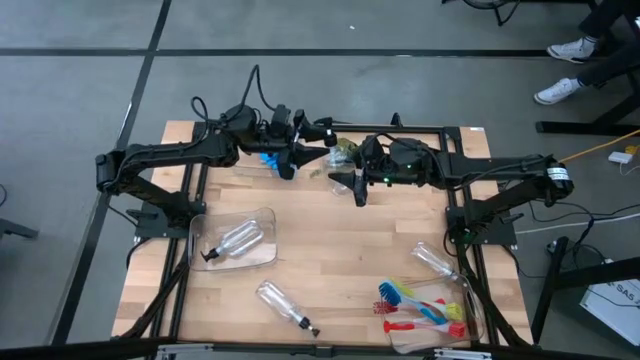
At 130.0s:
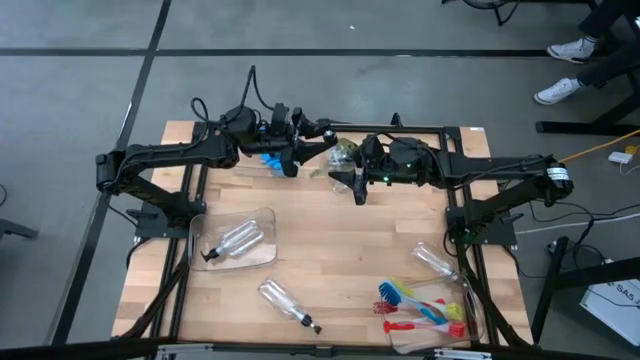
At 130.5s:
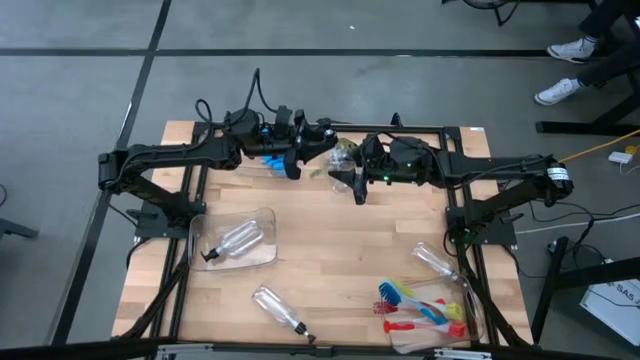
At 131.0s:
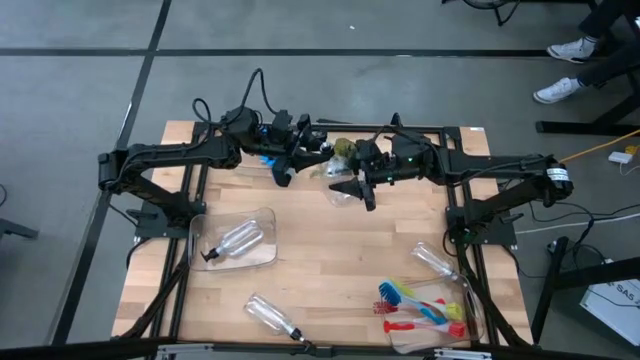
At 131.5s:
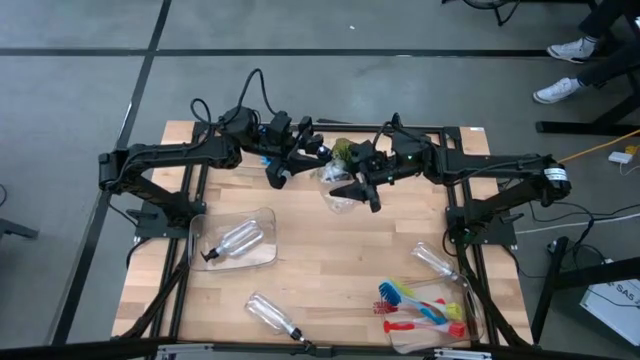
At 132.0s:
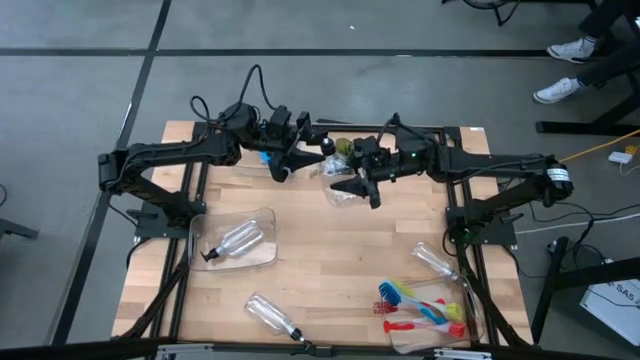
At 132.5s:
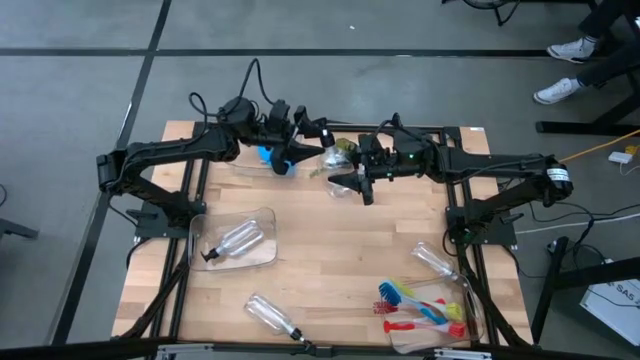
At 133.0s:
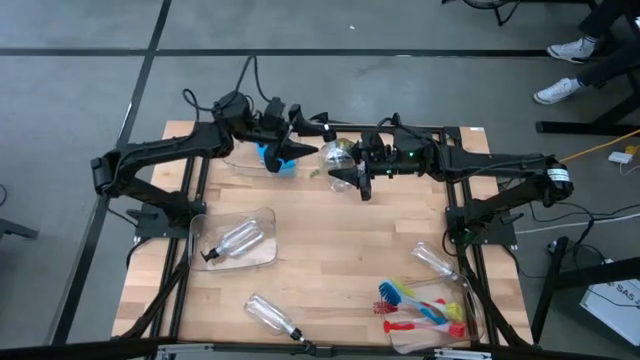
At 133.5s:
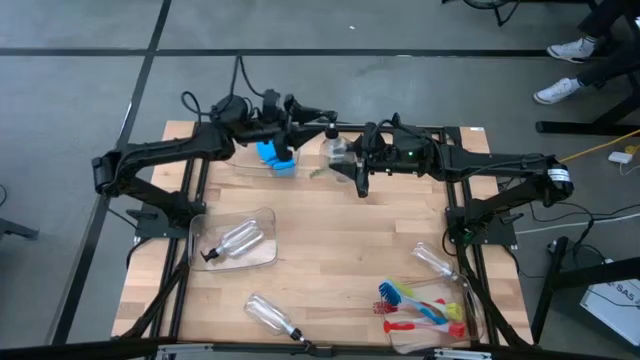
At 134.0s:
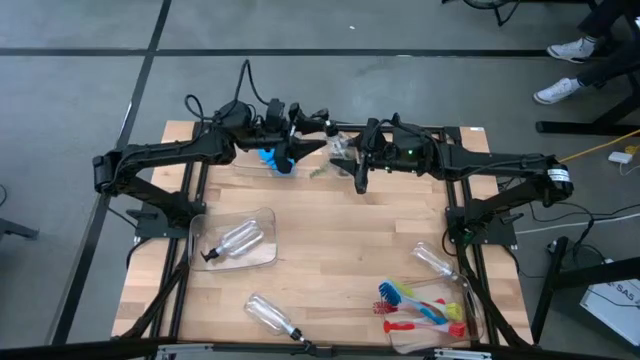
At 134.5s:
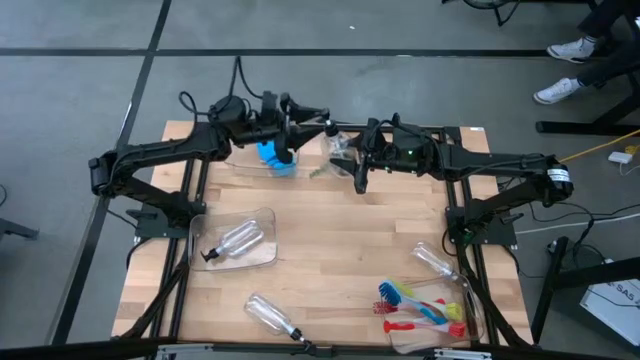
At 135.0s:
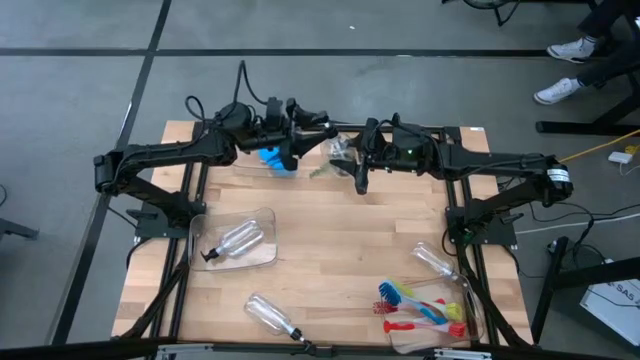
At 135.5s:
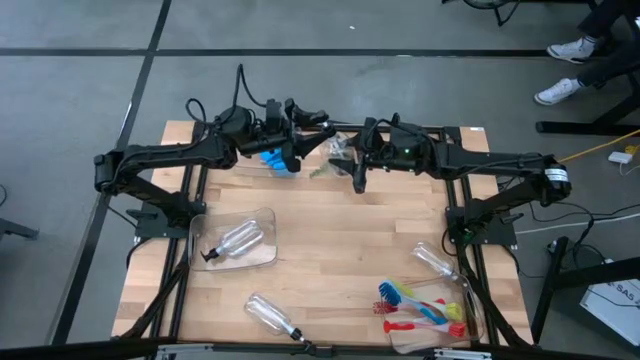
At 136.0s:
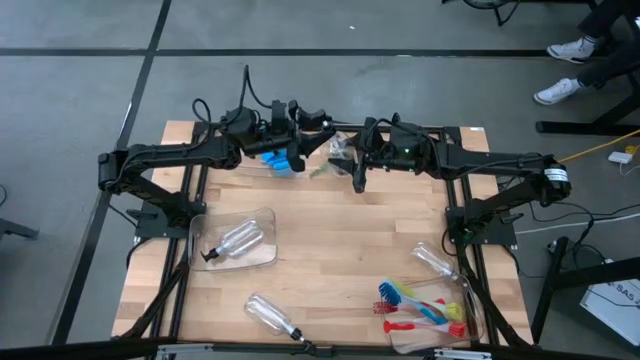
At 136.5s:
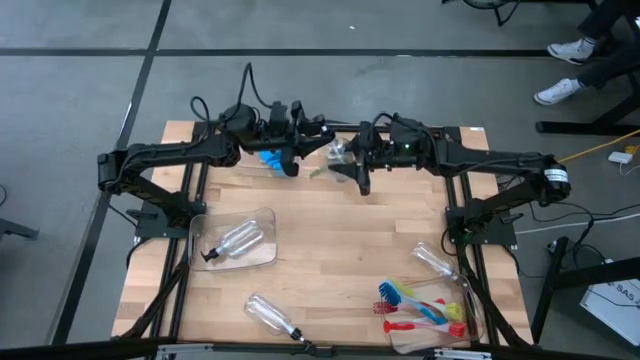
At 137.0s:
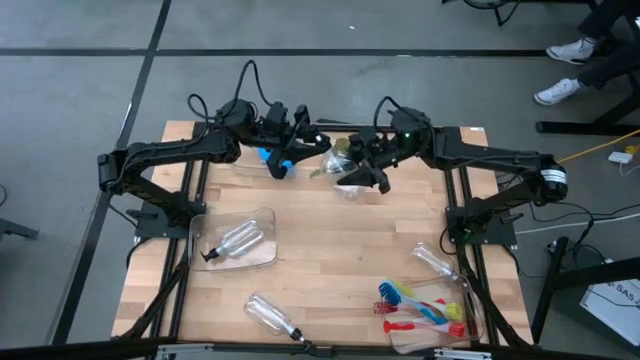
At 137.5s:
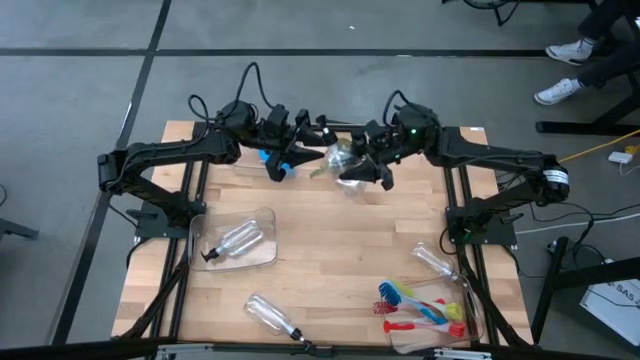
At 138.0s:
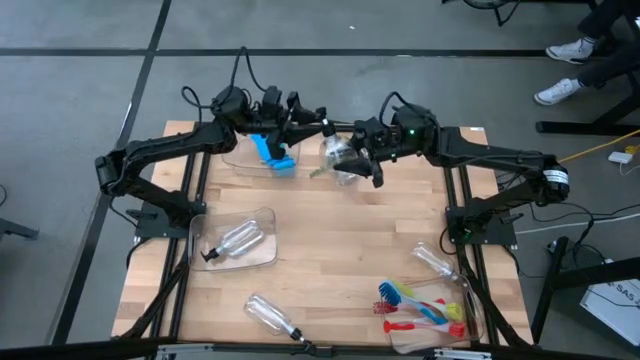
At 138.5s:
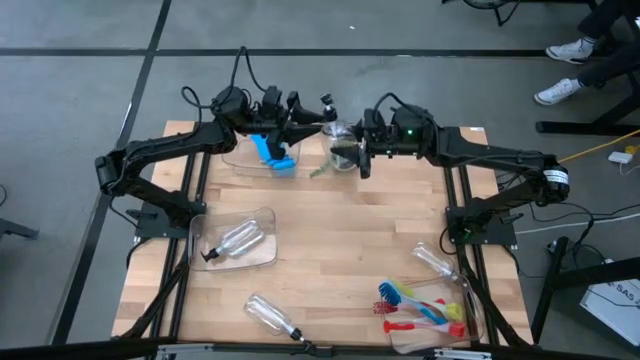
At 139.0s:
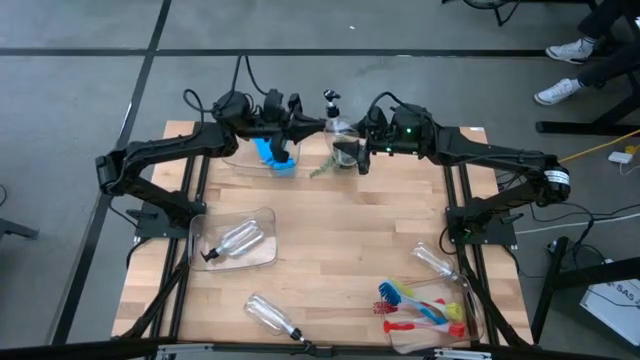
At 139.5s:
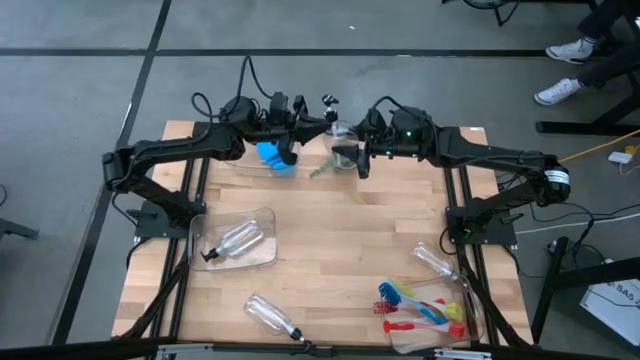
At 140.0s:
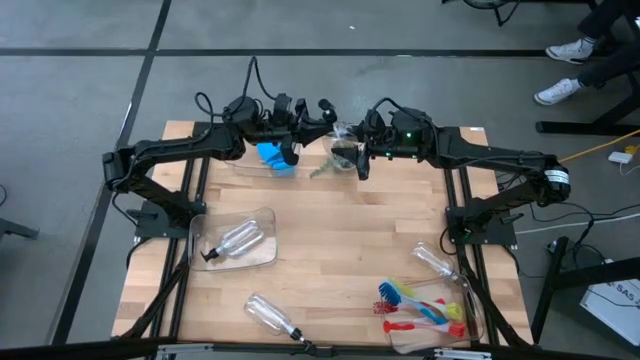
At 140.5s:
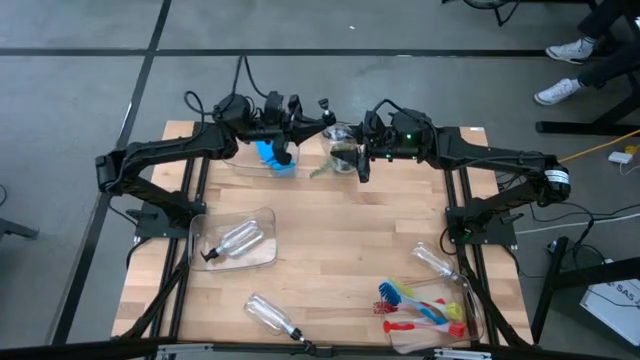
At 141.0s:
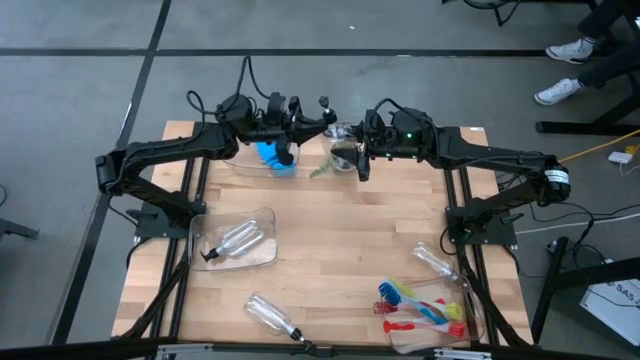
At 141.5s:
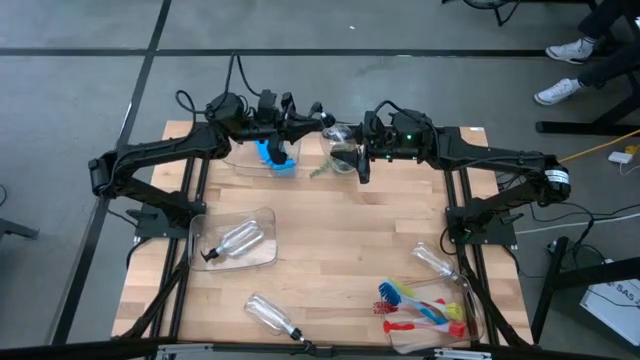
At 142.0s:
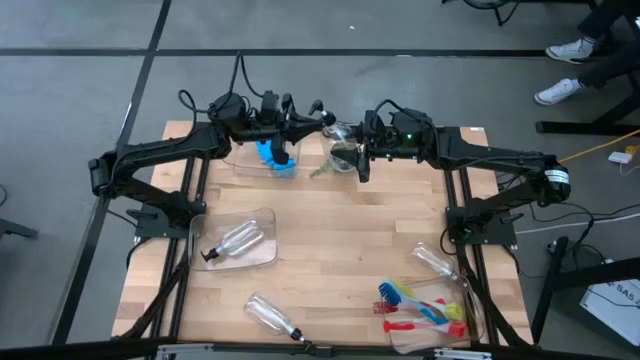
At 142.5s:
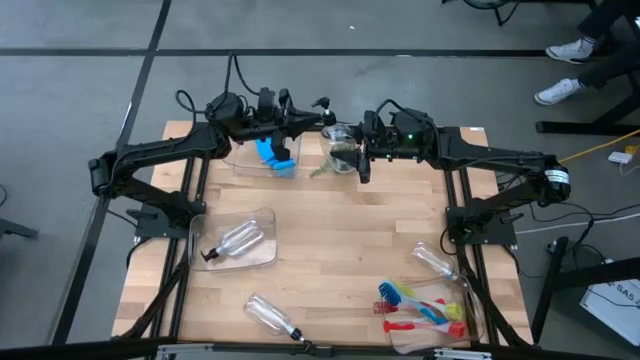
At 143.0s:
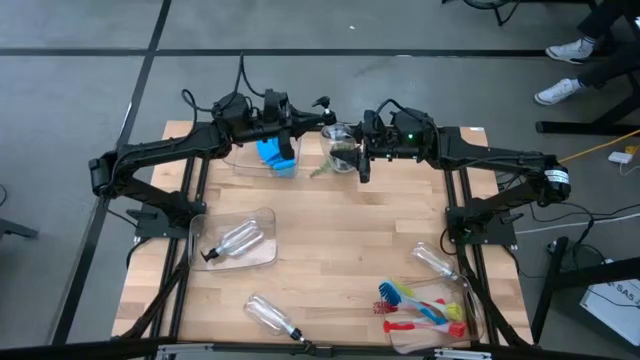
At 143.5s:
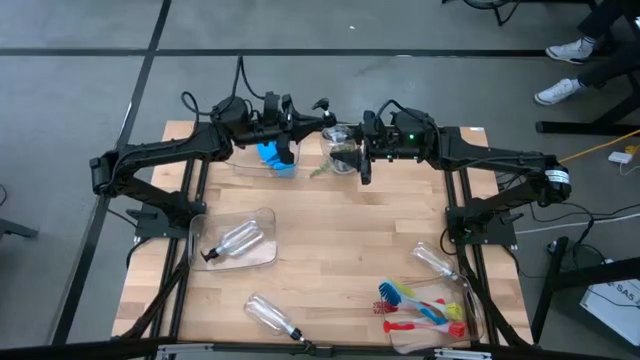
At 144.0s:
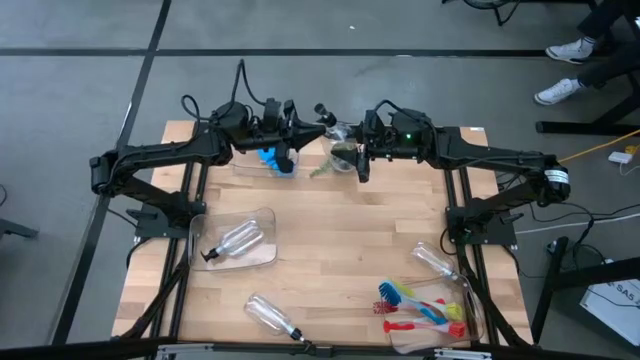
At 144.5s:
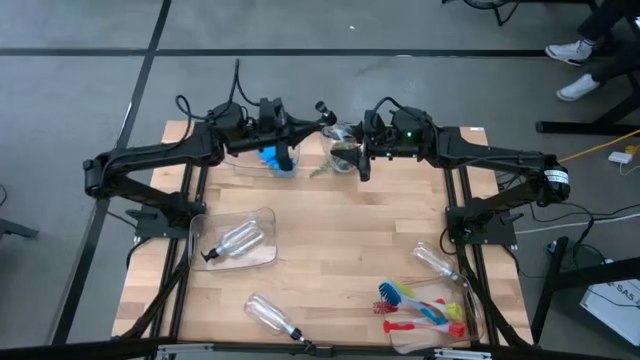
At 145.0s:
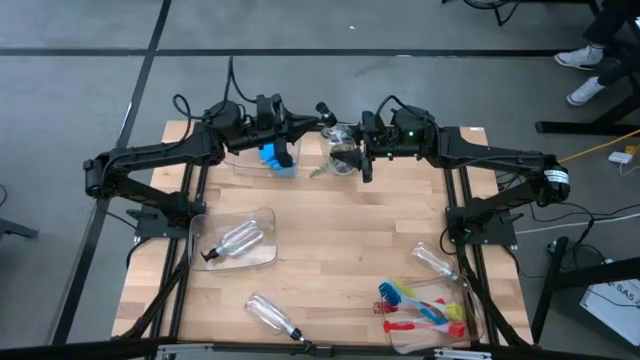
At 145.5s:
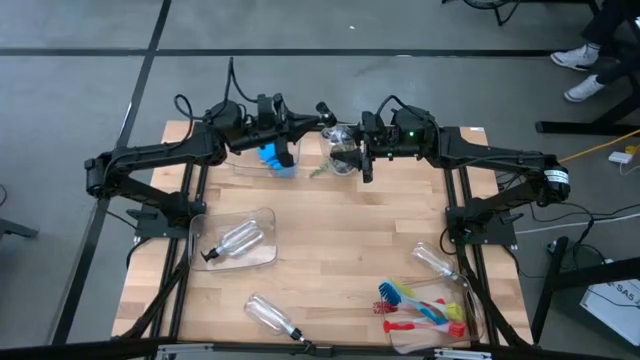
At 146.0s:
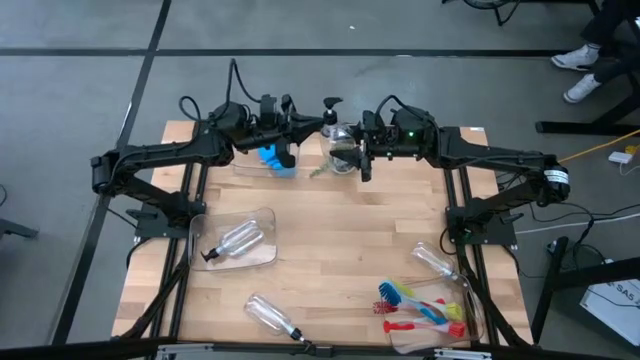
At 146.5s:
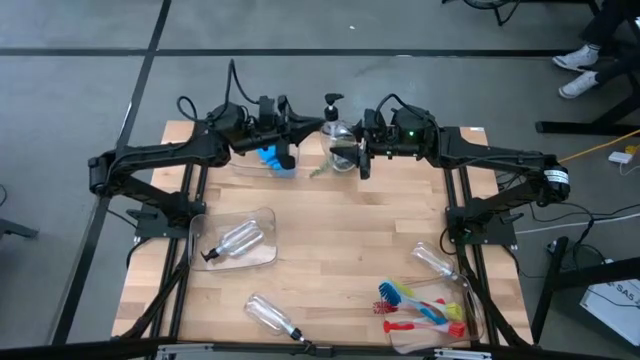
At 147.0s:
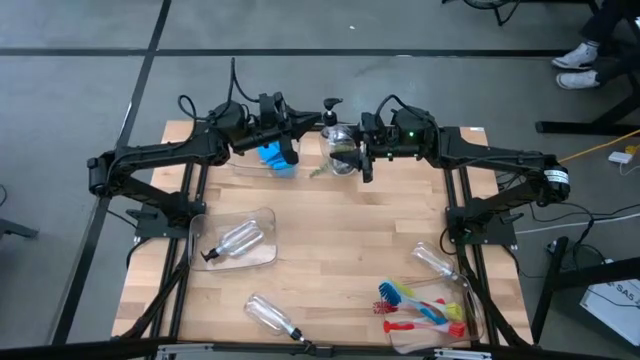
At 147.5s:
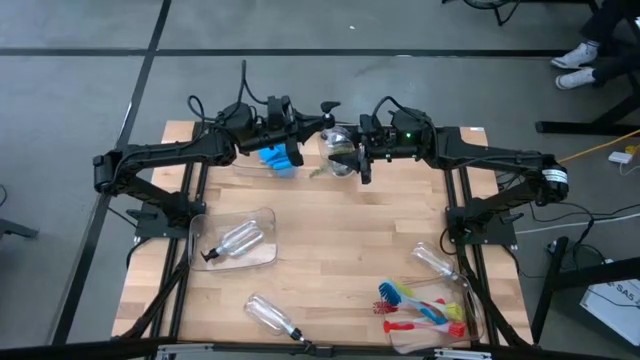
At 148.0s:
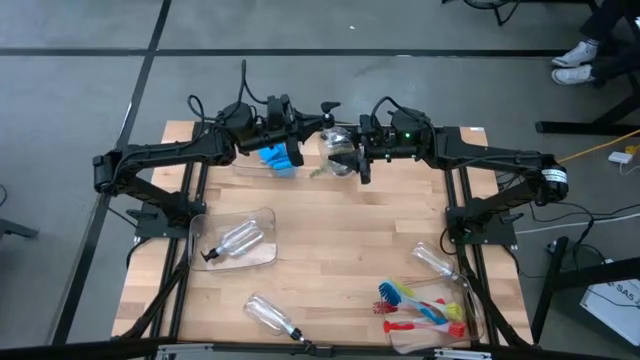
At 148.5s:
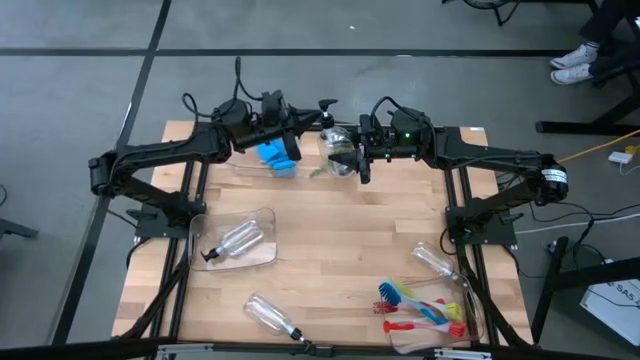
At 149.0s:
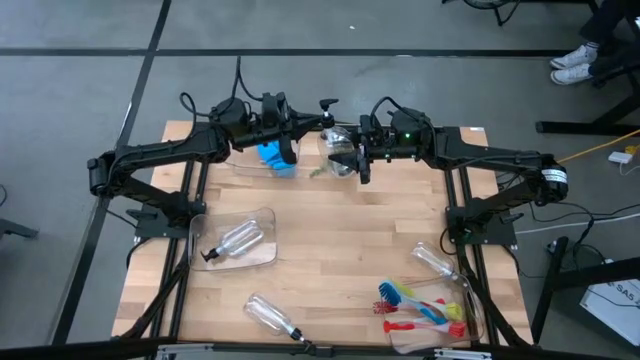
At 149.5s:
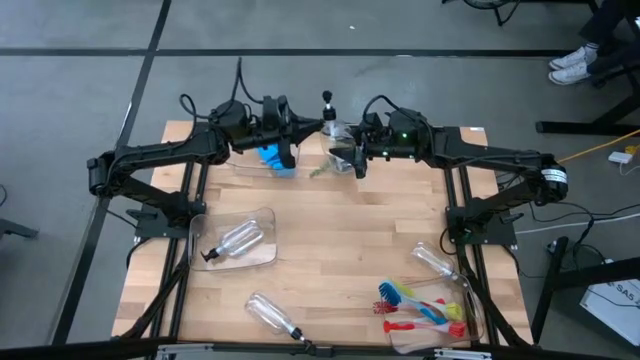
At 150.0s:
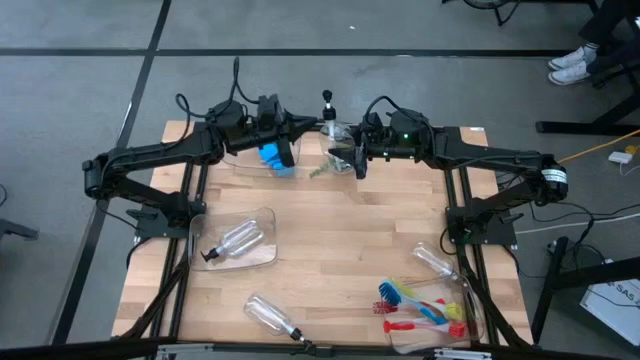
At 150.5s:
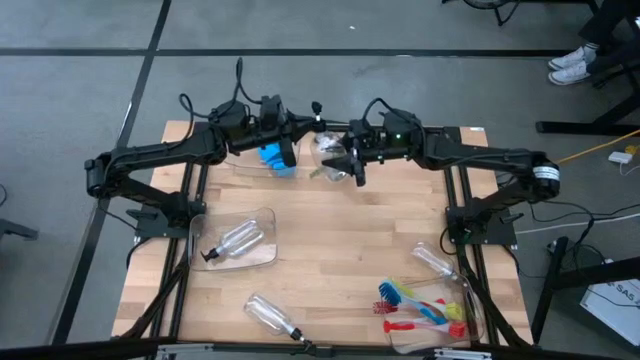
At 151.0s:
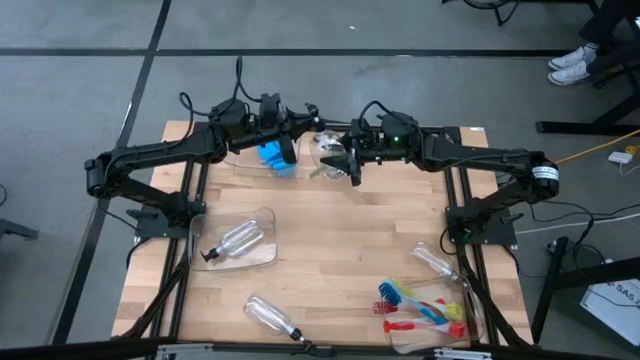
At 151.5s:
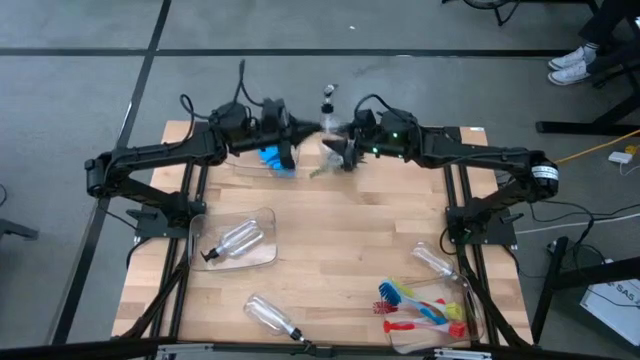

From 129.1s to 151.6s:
Task: Pick & Place Kitchen Sink Supplies
Put the transparent soap dispenser into the middle transparent bin
